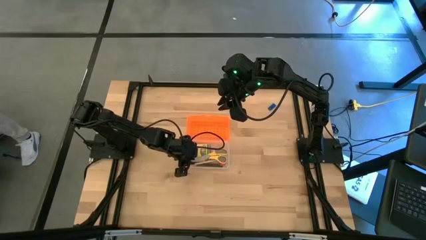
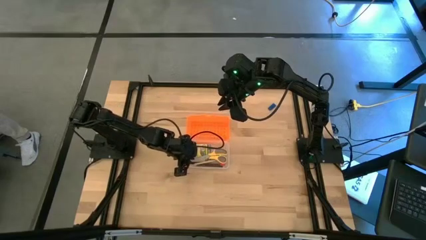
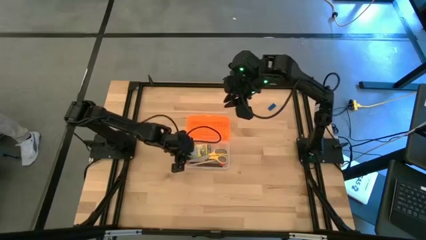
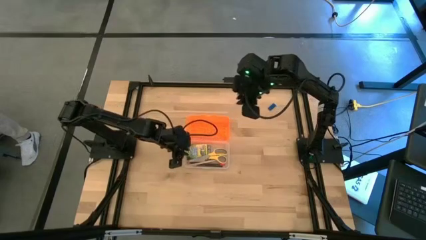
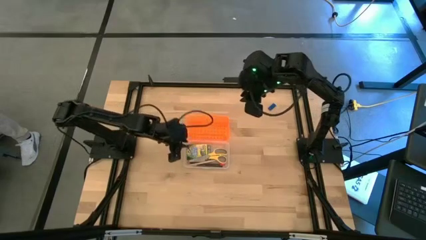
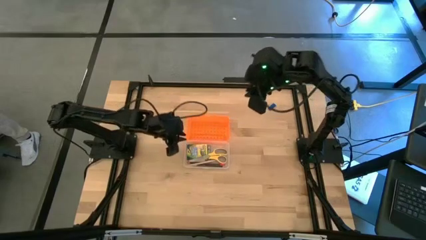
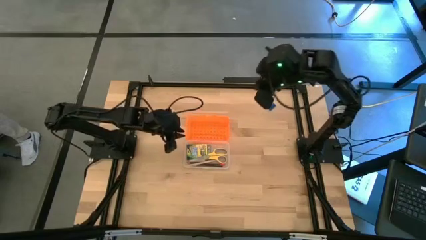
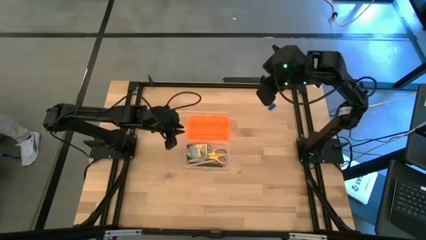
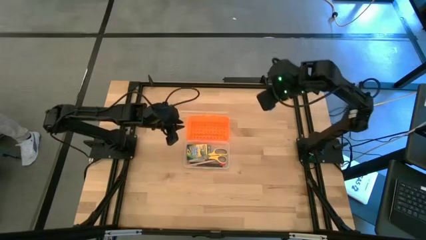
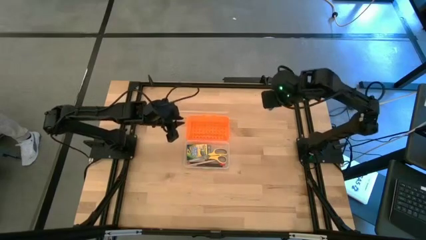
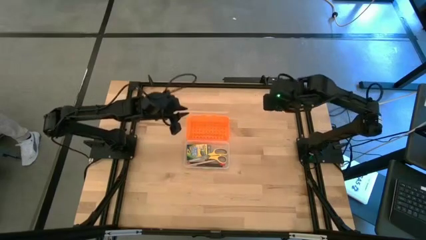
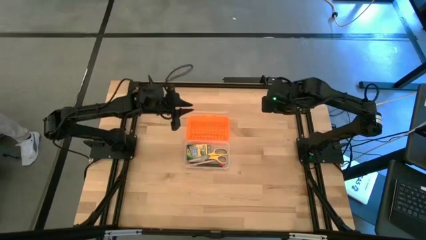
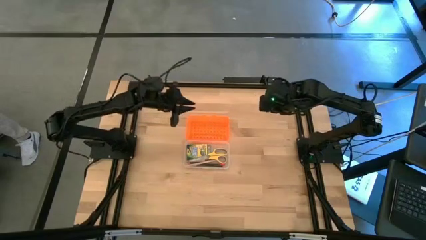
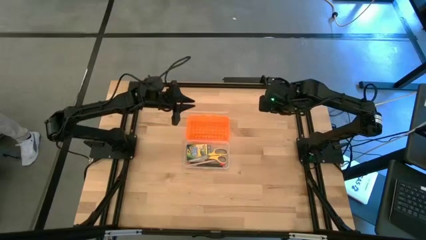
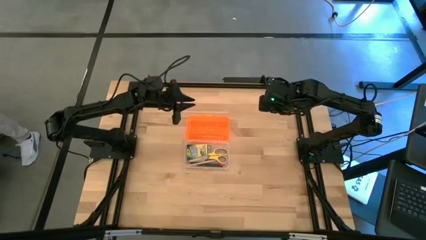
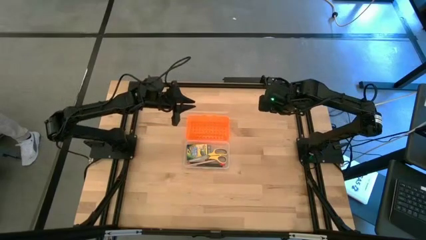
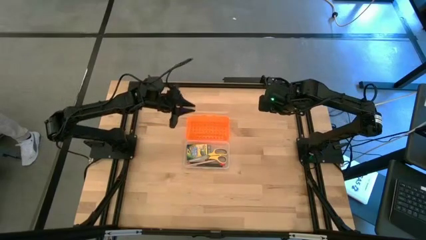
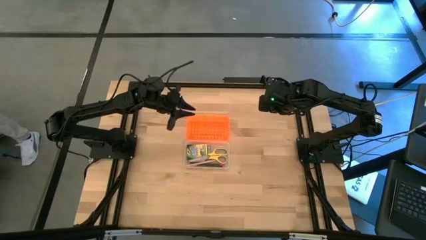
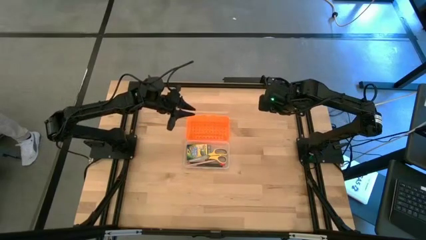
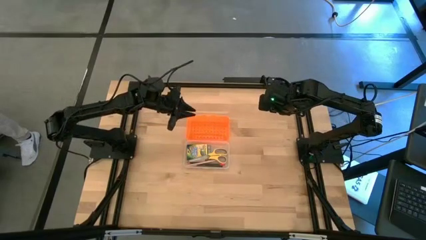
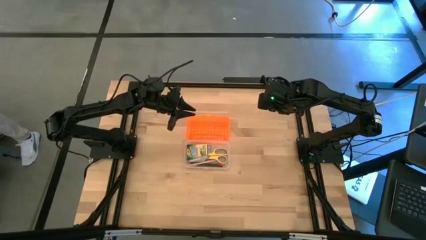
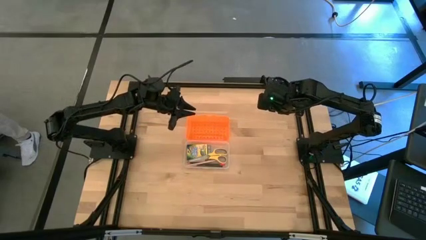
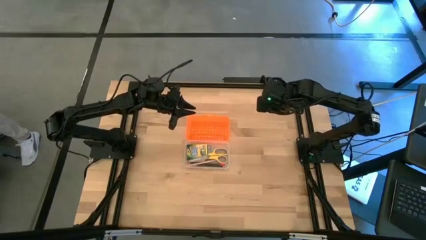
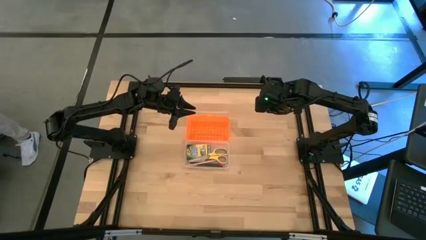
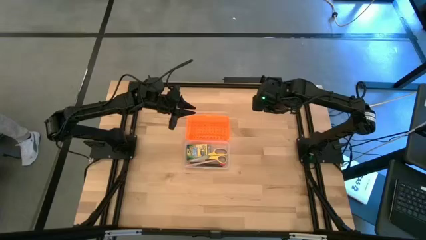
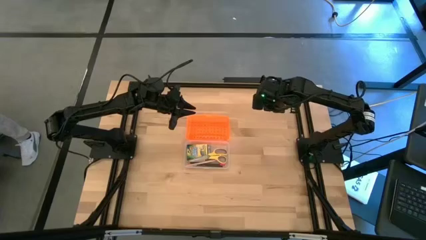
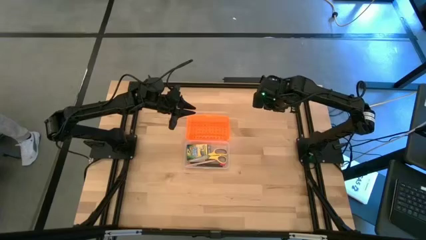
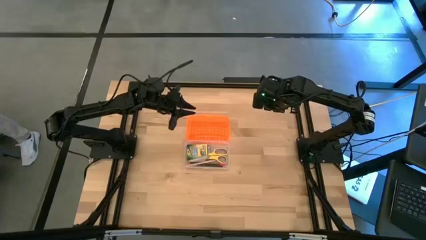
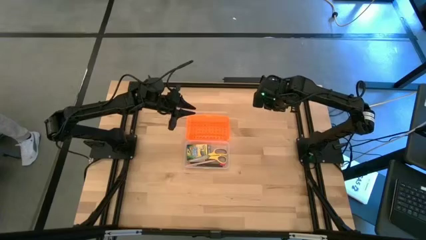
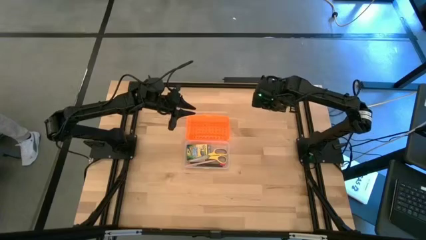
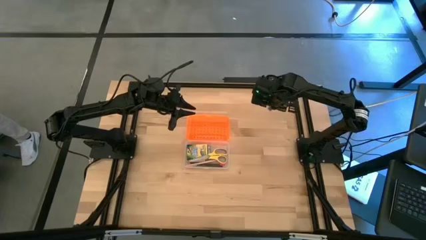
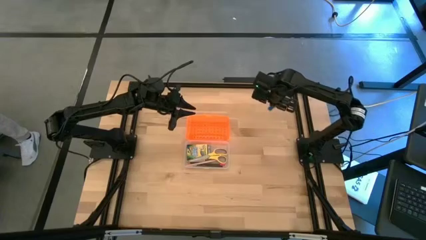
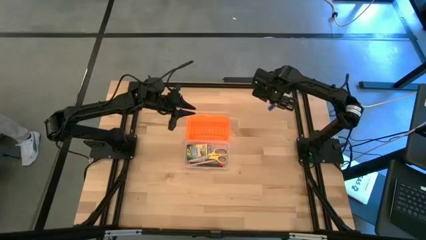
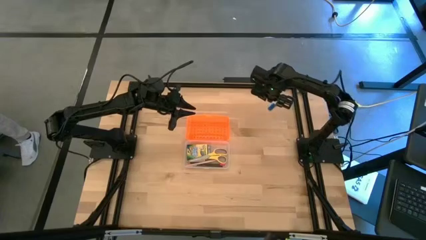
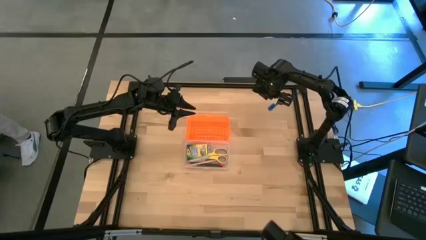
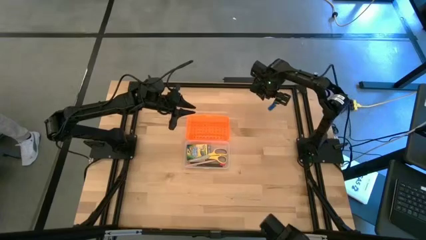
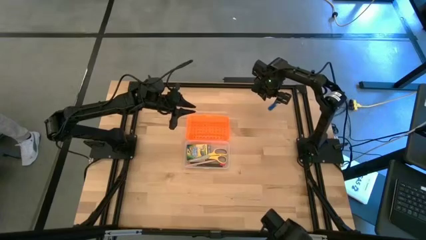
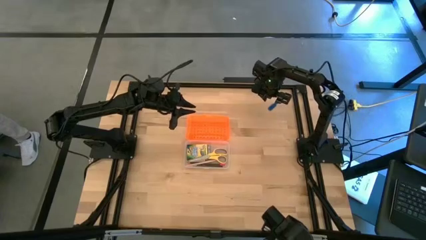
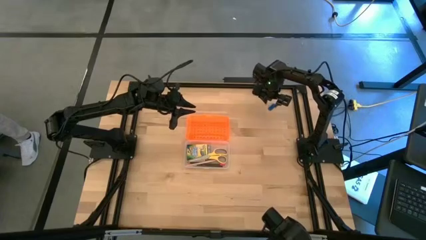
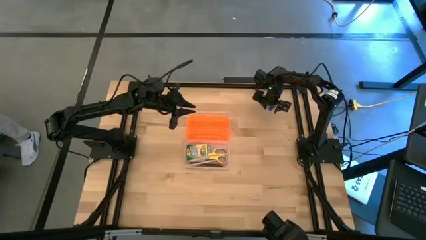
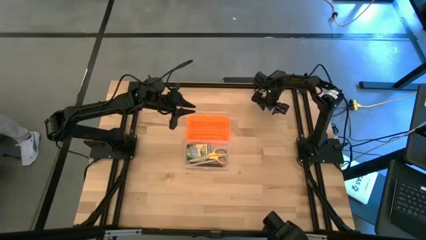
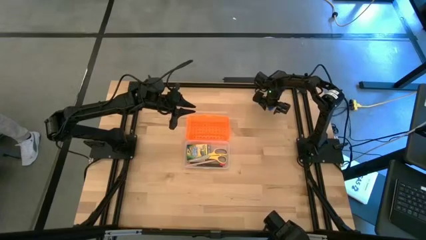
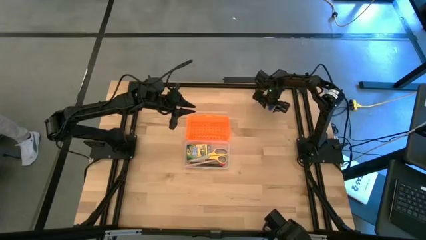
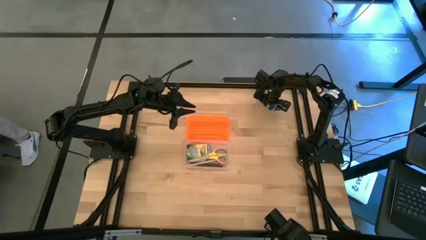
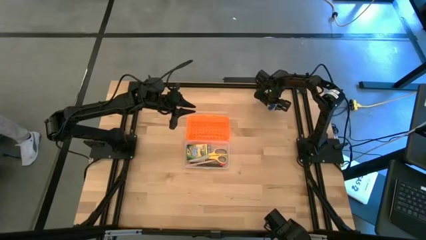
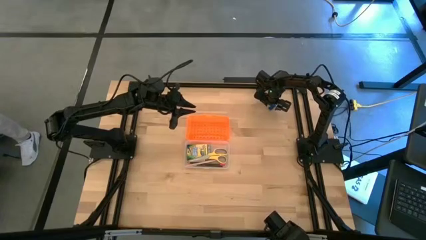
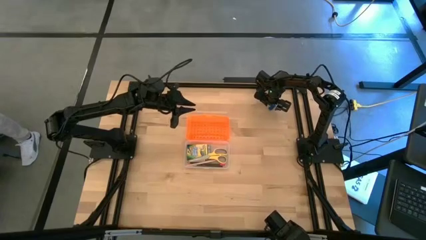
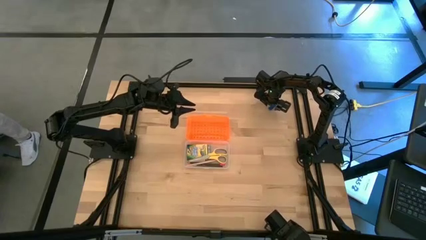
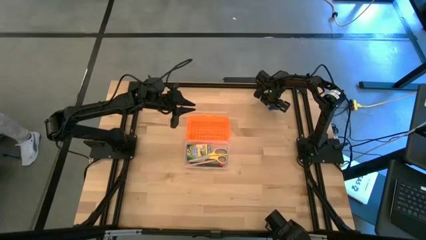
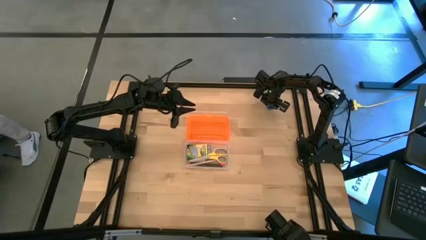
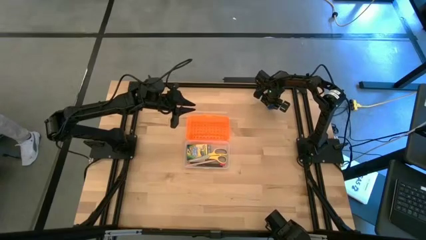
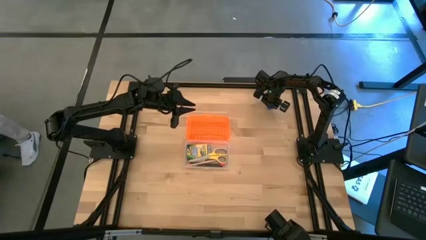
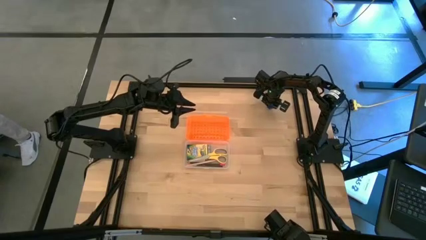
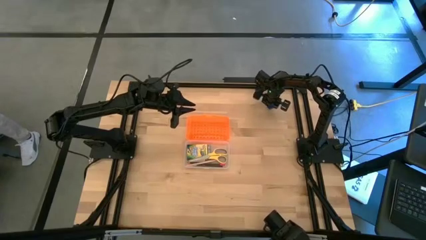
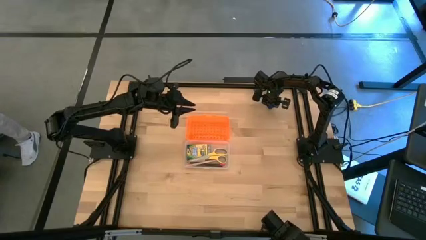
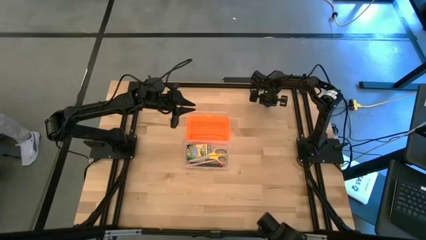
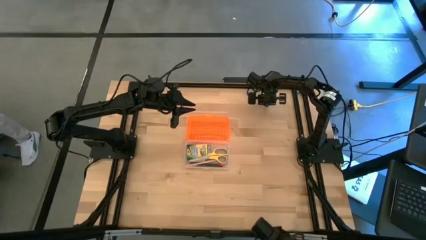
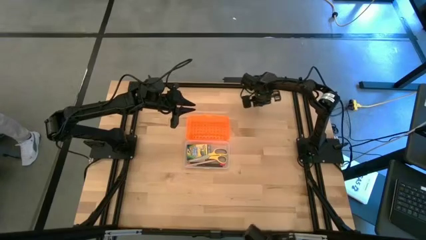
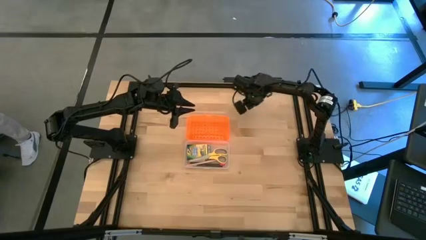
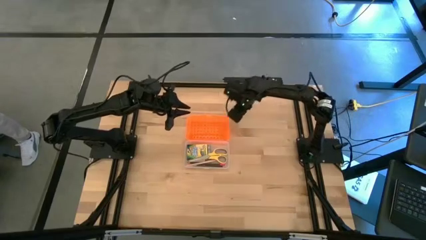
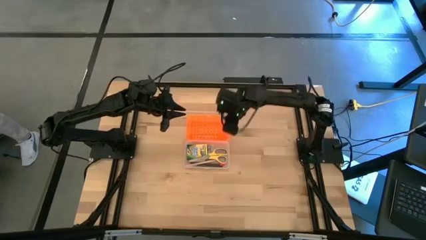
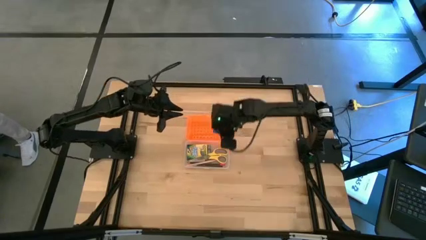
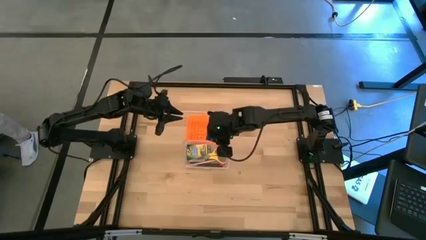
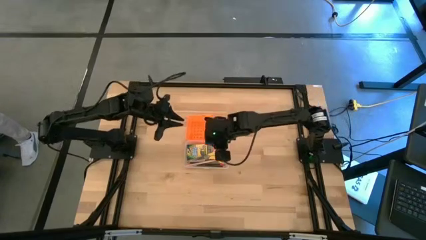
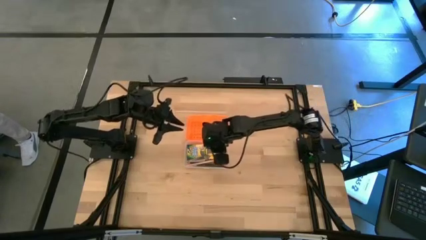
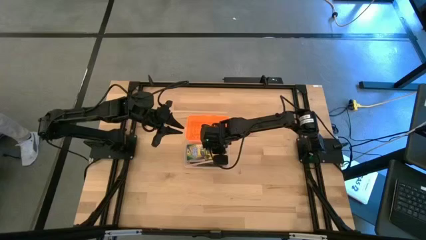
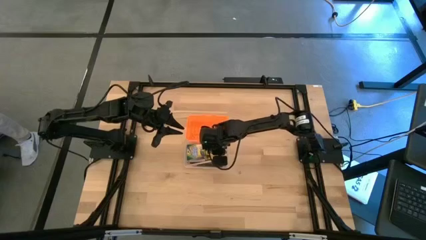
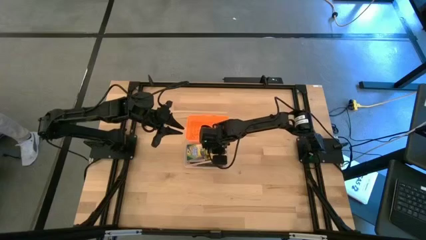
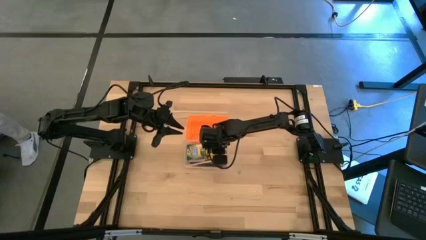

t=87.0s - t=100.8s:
Task: Pack school essentials
Put the blue eraser into the supply box
